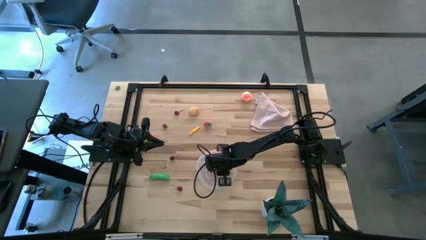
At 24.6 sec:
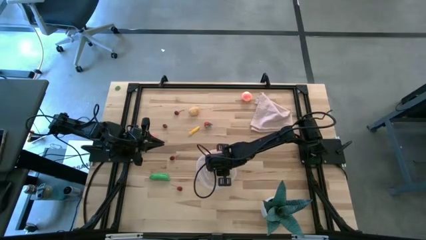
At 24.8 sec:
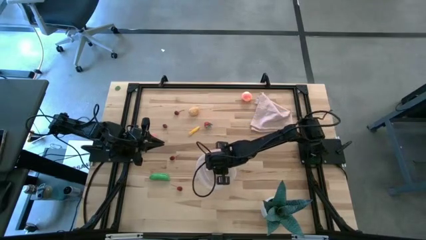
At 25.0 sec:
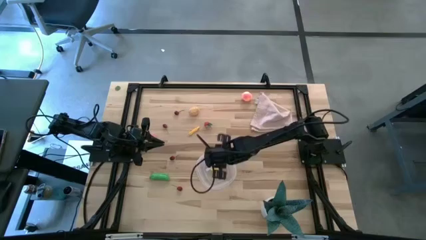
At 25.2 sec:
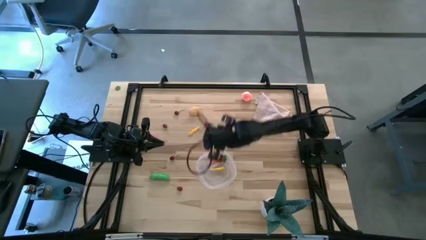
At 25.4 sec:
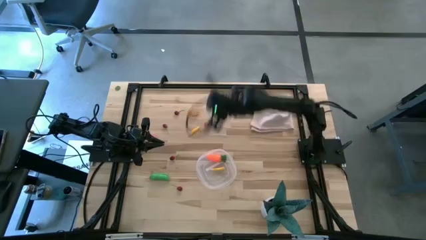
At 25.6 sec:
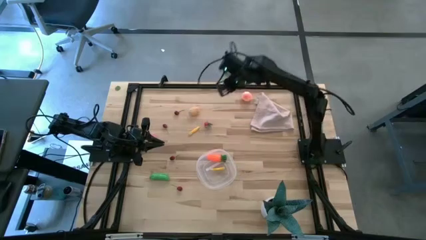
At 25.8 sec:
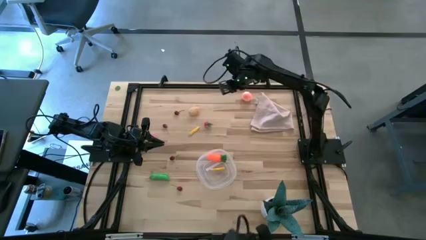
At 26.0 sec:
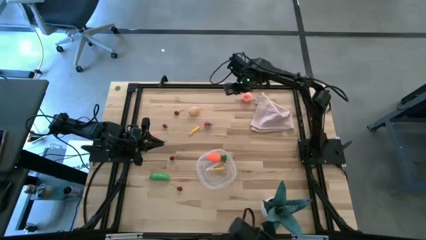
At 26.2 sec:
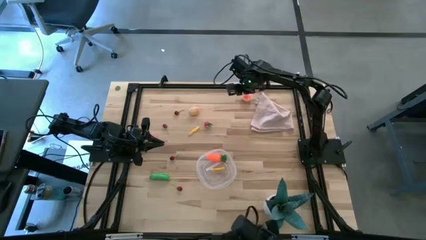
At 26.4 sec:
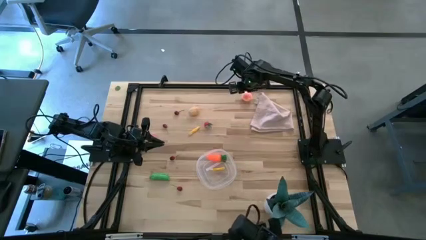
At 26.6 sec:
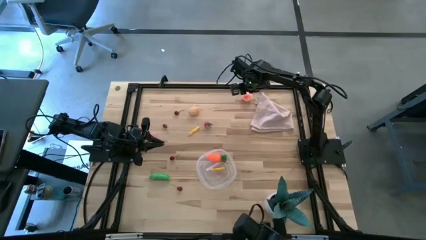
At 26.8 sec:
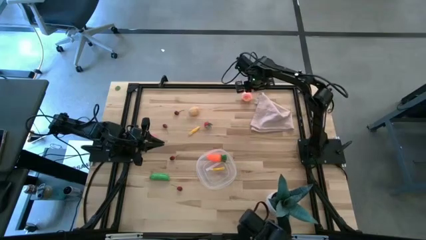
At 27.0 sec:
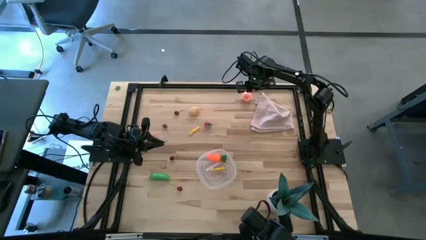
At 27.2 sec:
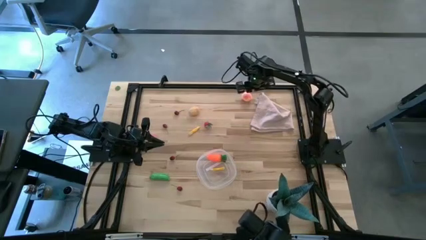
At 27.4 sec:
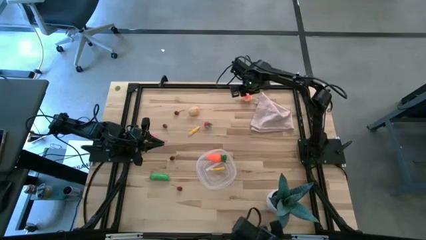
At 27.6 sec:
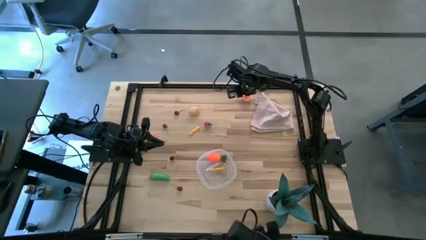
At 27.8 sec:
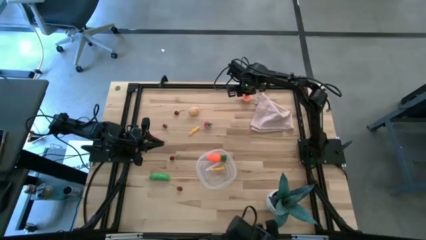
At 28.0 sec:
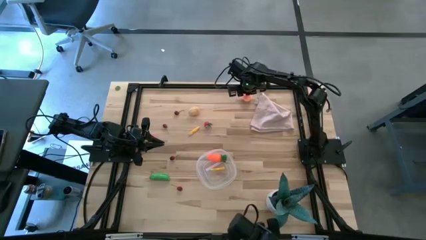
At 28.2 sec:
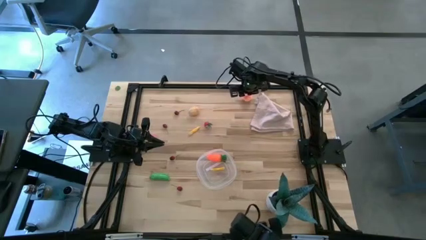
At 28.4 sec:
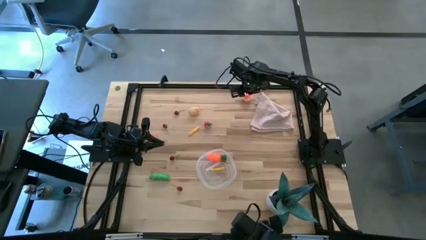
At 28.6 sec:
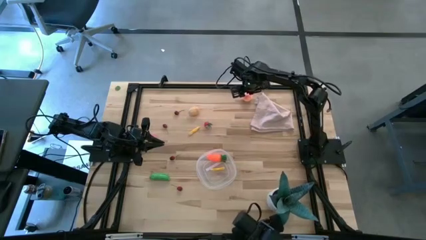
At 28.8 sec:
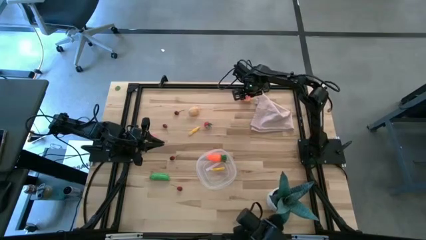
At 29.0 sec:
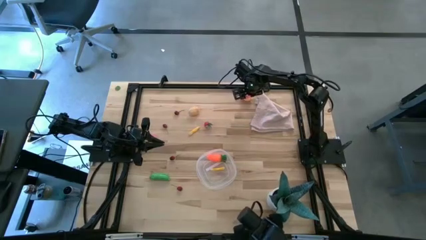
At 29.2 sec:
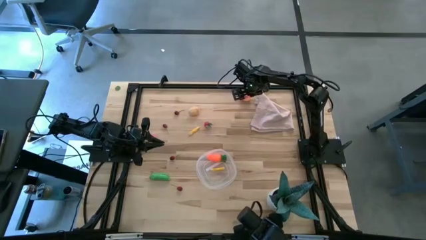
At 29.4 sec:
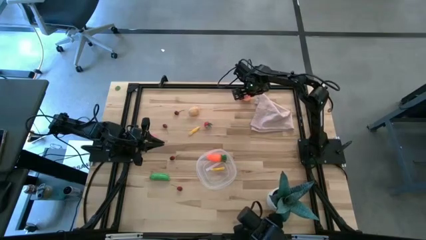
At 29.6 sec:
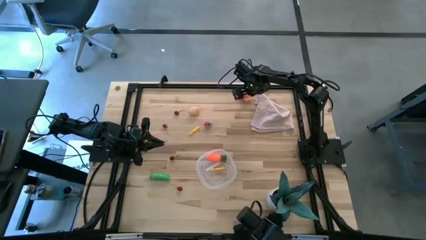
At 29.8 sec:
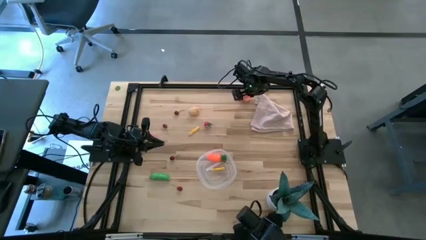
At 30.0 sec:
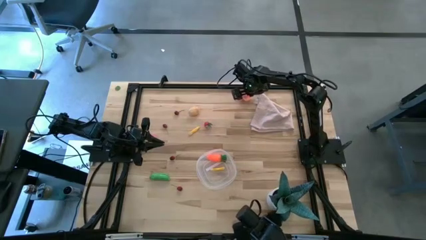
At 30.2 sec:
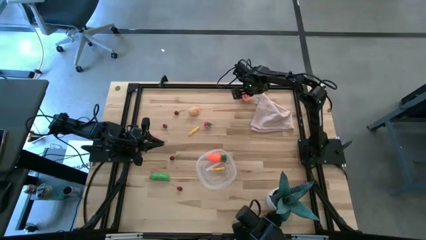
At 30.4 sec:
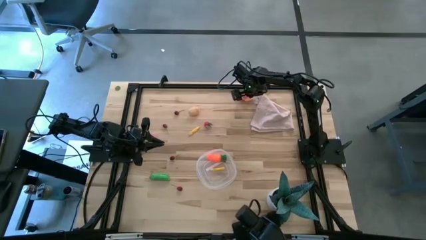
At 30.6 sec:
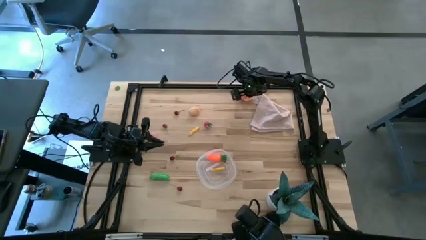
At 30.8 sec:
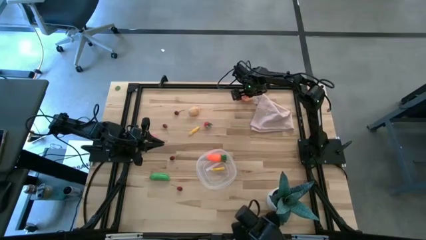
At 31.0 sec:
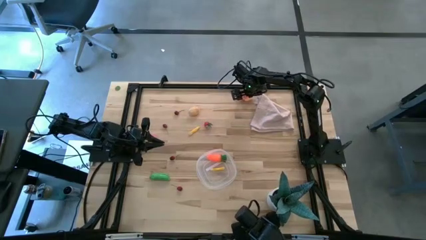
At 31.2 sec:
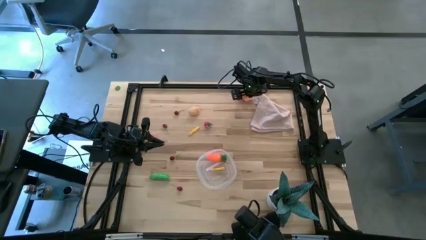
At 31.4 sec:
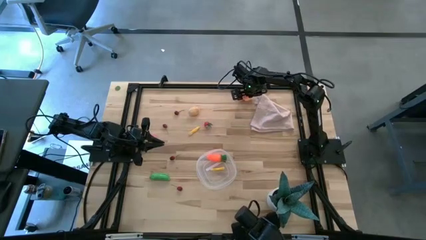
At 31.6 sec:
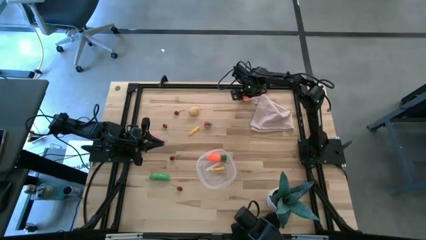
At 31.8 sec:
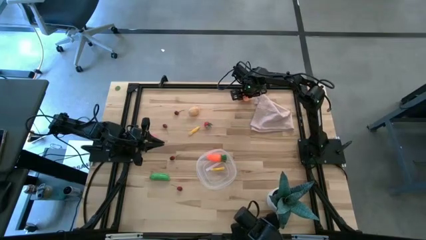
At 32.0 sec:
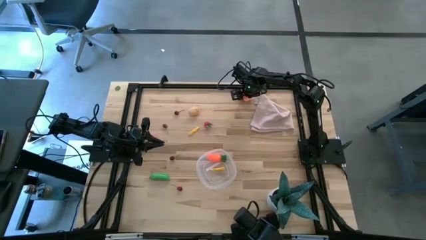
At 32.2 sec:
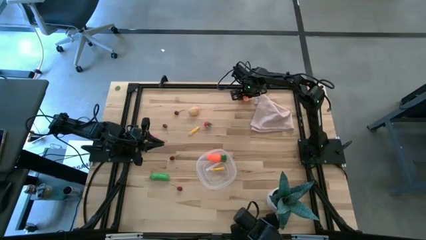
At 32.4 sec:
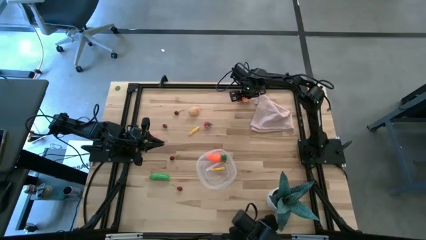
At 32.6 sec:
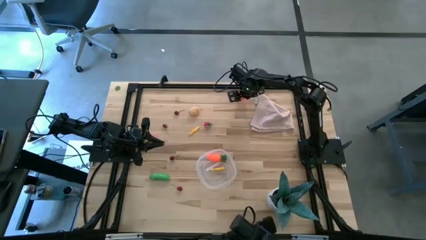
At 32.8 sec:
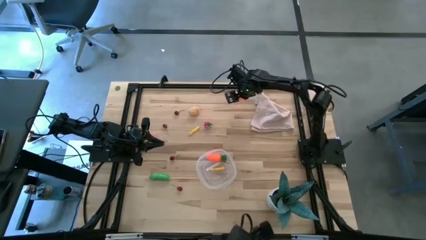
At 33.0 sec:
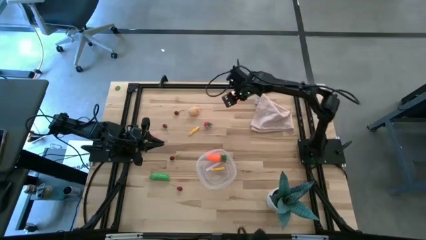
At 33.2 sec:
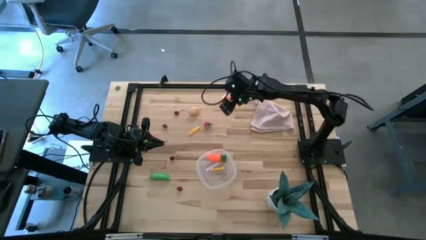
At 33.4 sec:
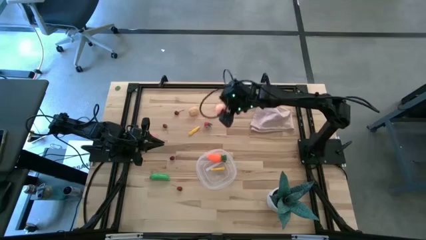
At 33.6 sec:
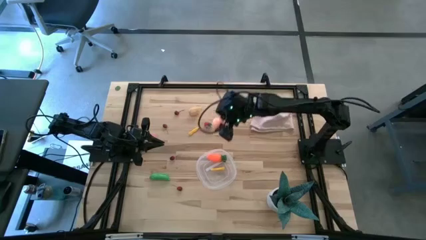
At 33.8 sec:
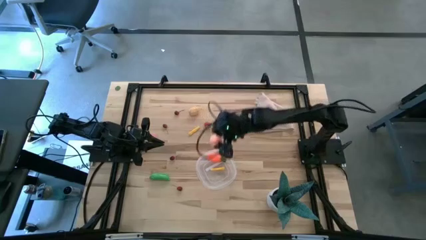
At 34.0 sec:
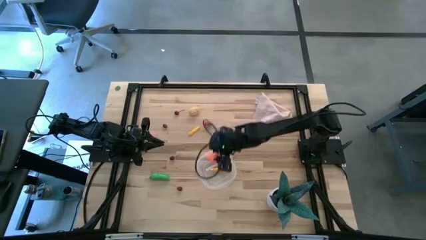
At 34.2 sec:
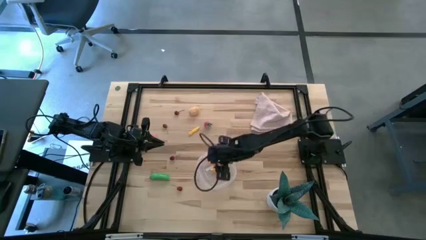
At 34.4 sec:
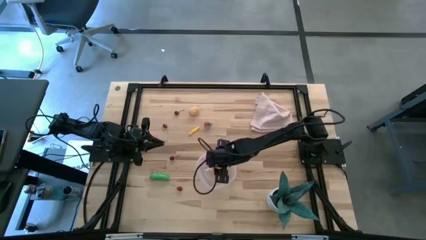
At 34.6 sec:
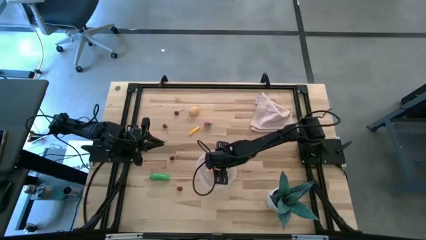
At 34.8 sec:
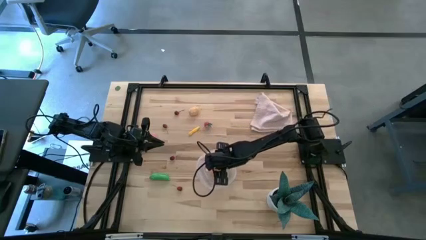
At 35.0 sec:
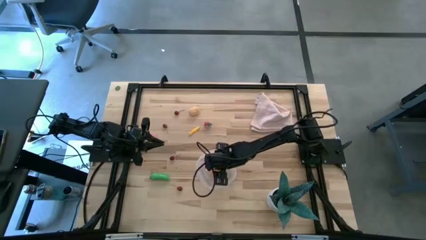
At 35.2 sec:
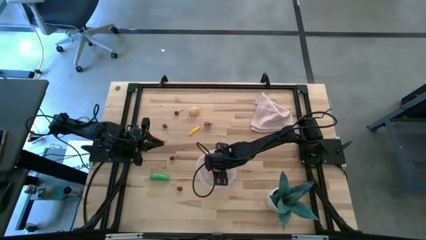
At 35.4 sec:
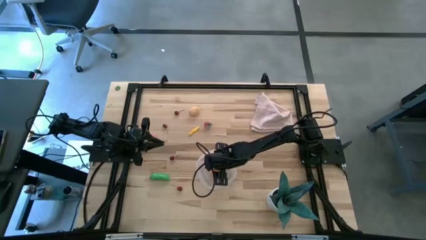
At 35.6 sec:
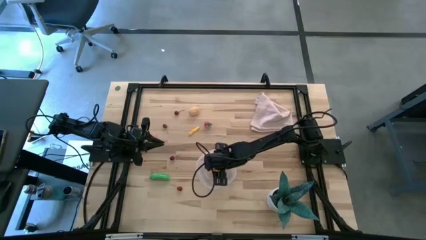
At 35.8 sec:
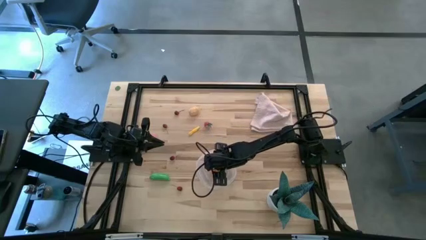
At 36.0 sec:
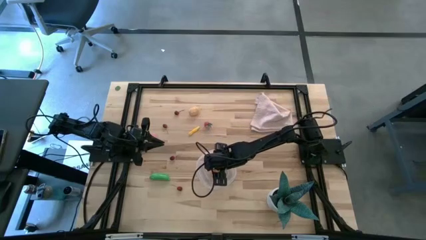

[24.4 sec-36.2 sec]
Task: Pick and placing Produce into tupperware
Put the peach into the transparent bin
